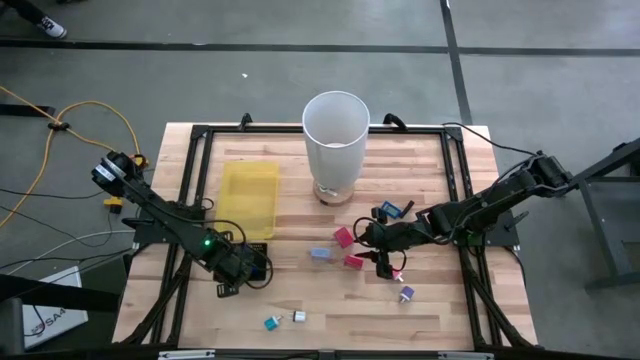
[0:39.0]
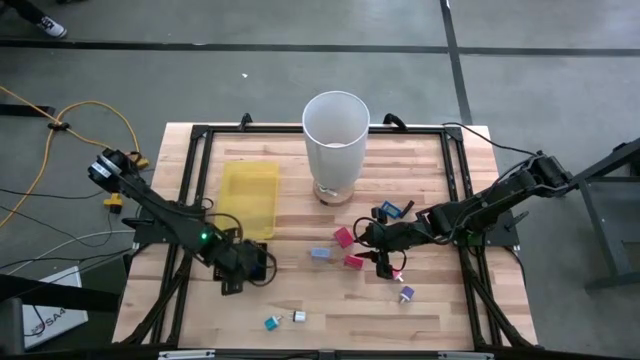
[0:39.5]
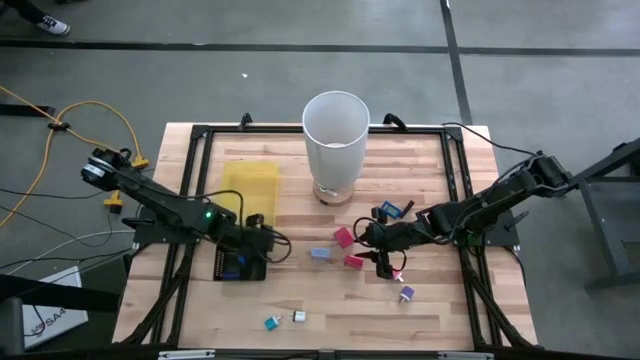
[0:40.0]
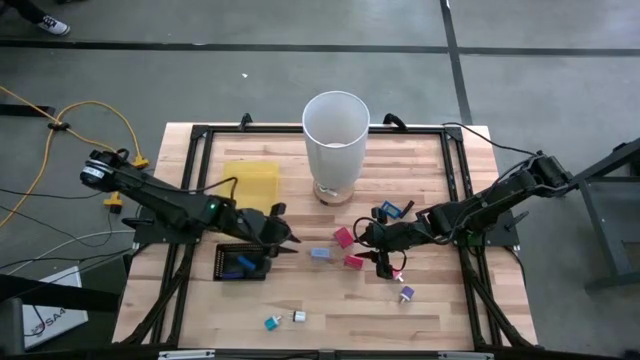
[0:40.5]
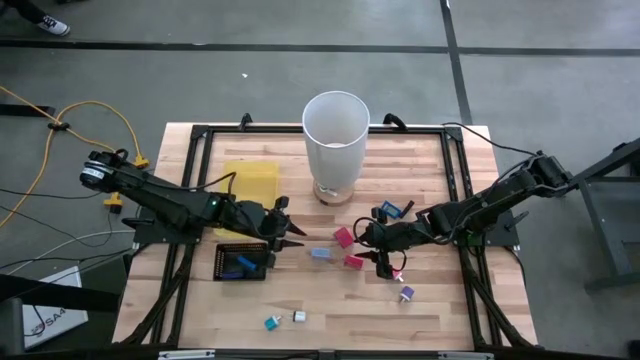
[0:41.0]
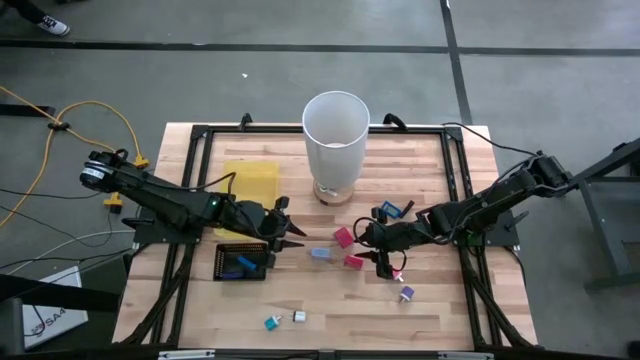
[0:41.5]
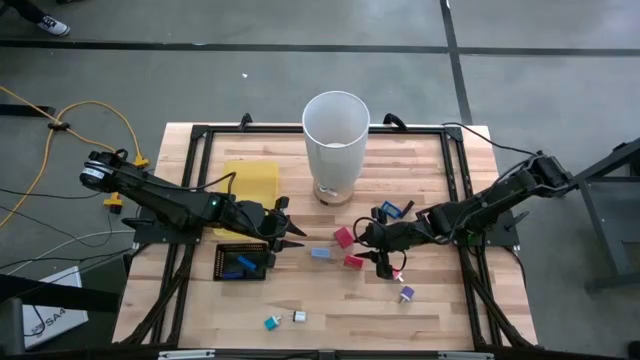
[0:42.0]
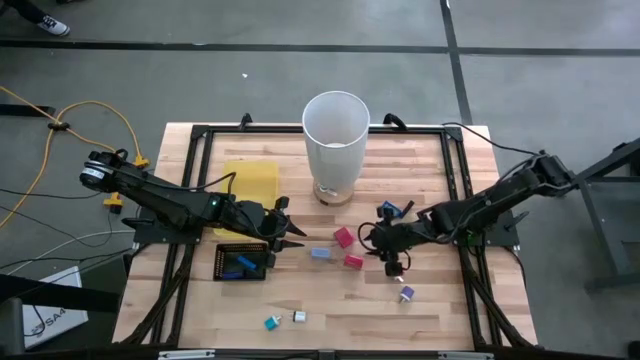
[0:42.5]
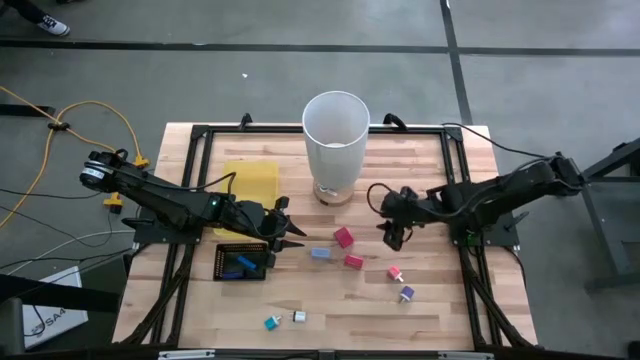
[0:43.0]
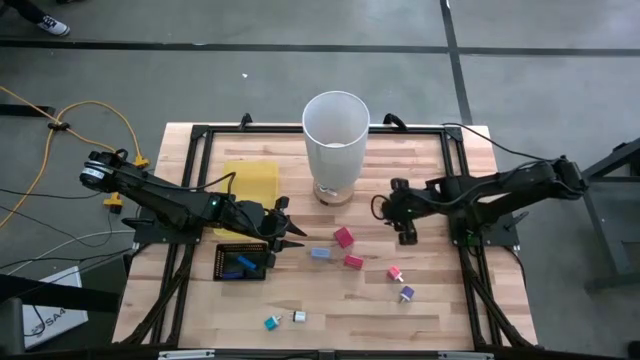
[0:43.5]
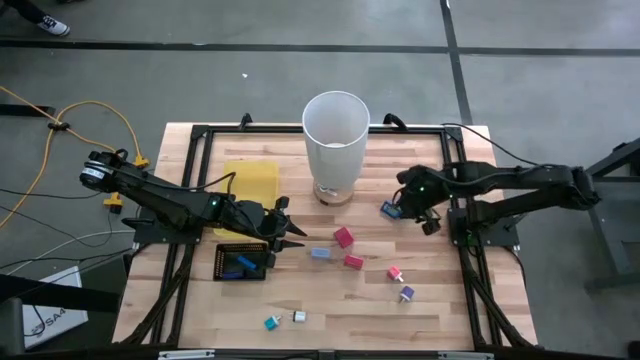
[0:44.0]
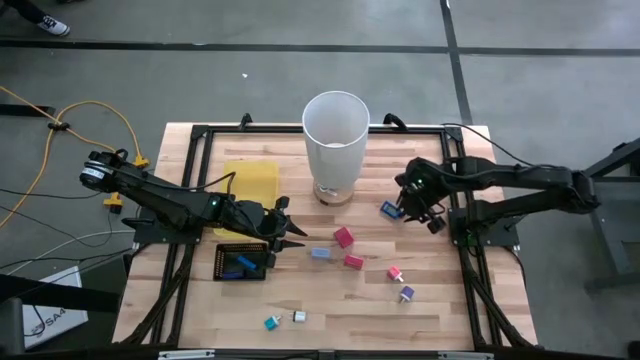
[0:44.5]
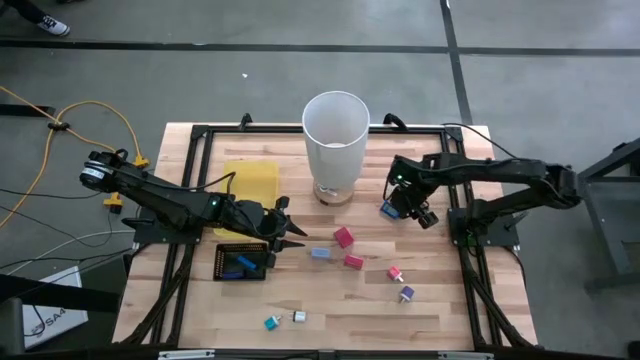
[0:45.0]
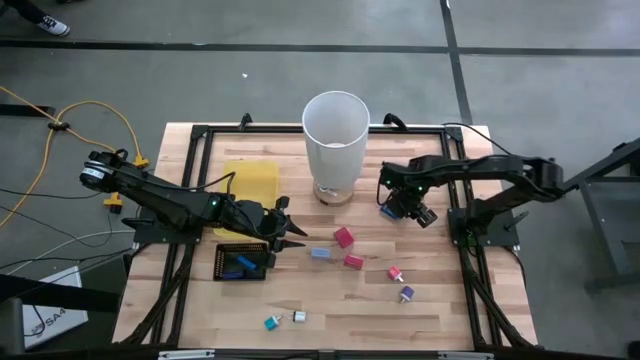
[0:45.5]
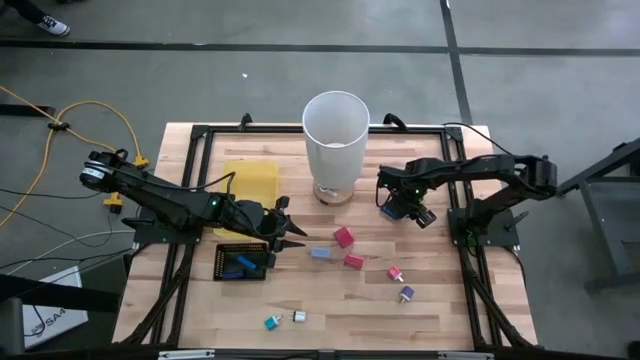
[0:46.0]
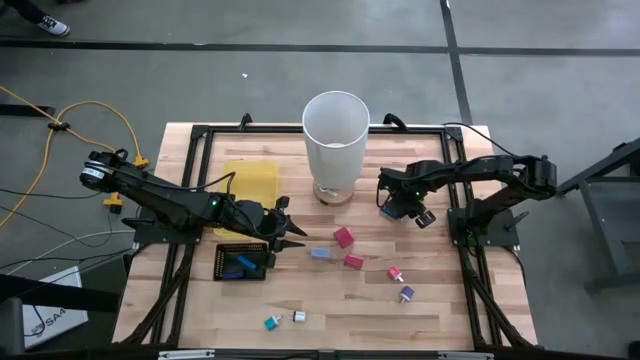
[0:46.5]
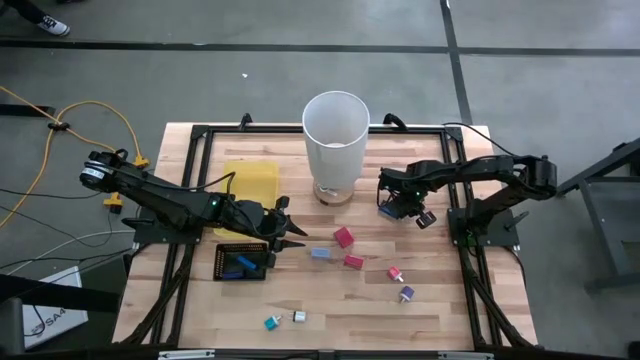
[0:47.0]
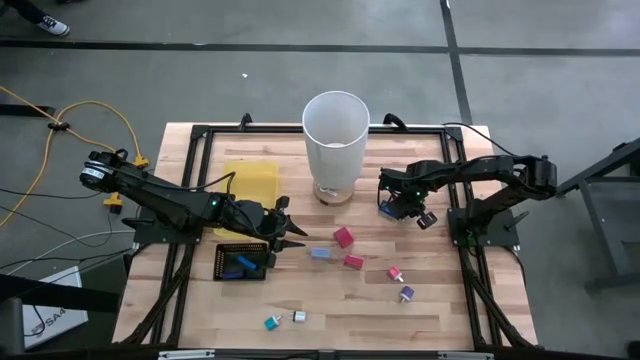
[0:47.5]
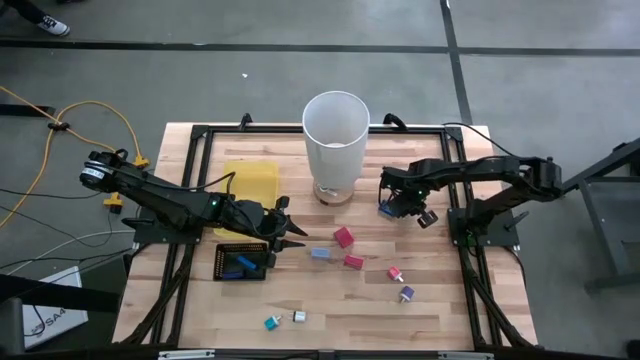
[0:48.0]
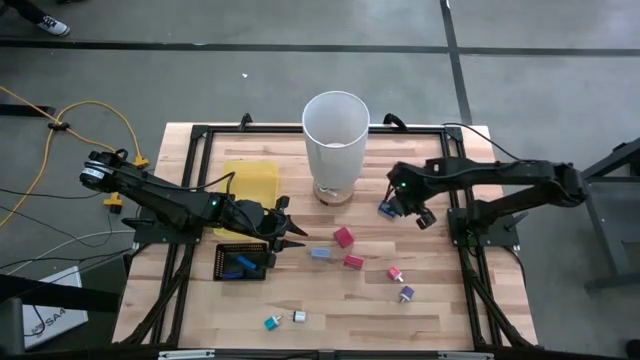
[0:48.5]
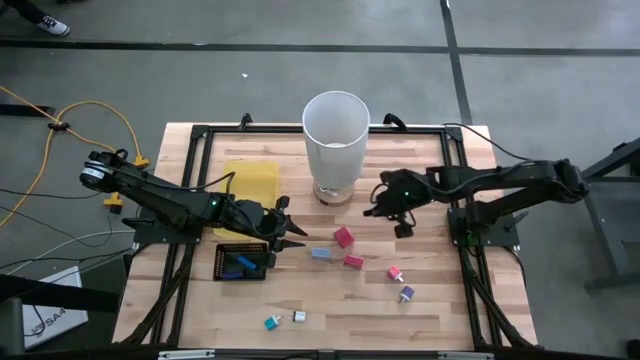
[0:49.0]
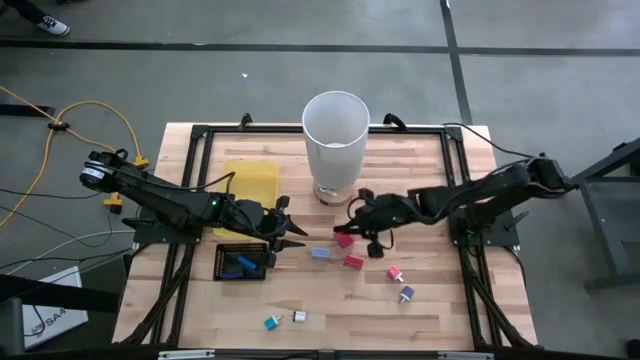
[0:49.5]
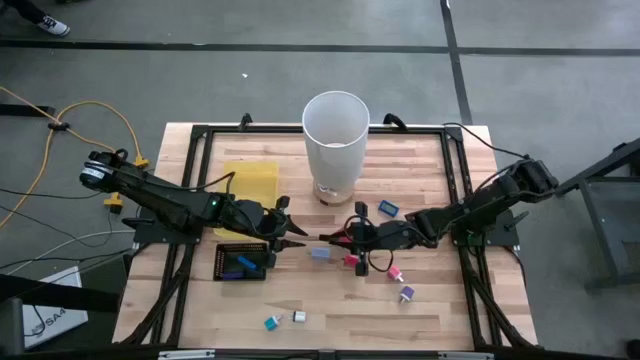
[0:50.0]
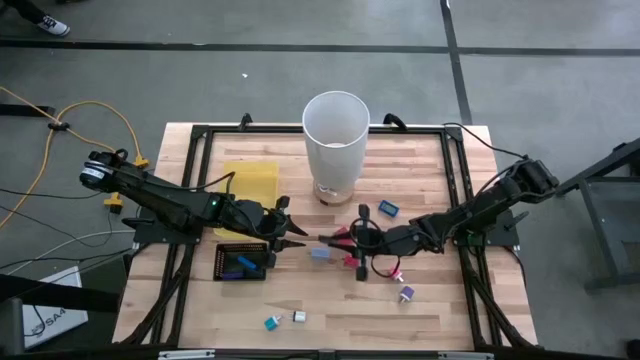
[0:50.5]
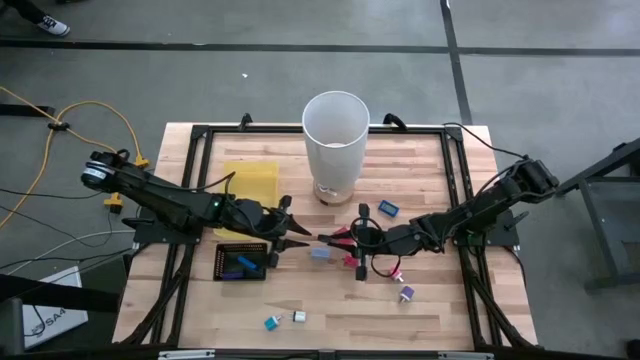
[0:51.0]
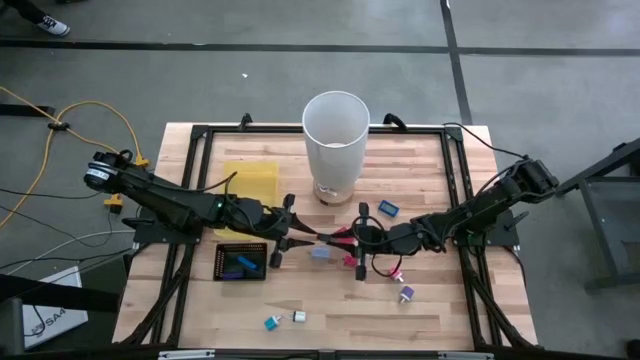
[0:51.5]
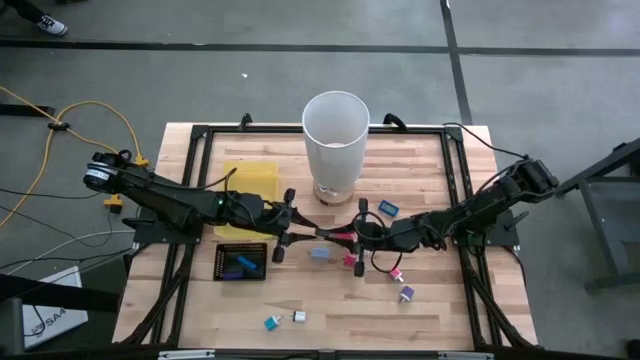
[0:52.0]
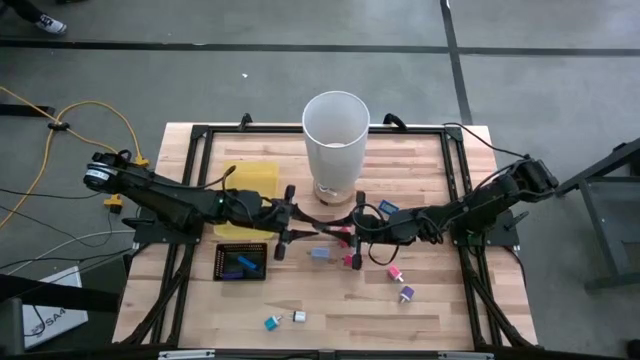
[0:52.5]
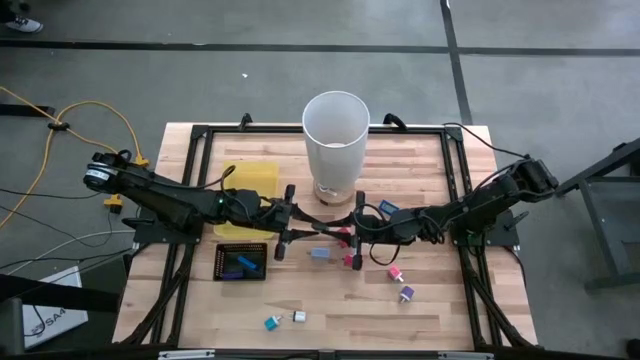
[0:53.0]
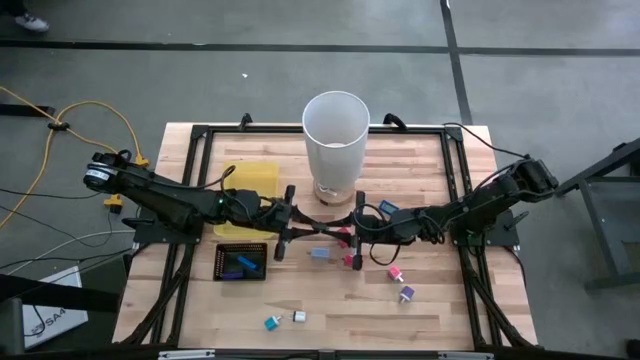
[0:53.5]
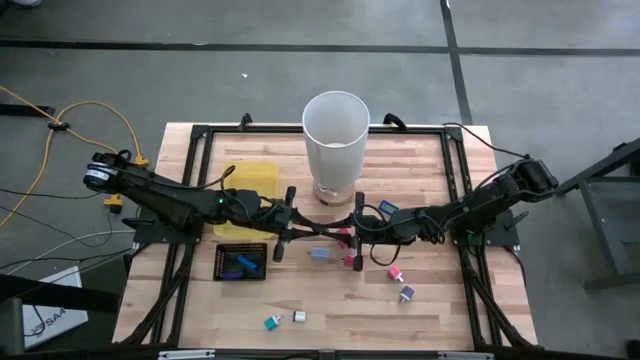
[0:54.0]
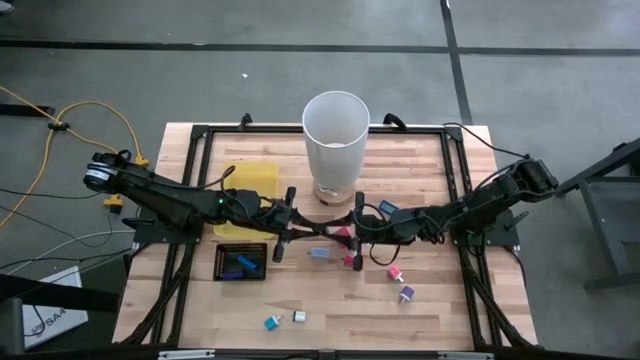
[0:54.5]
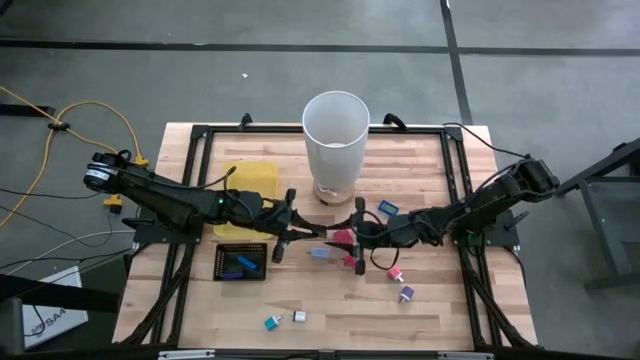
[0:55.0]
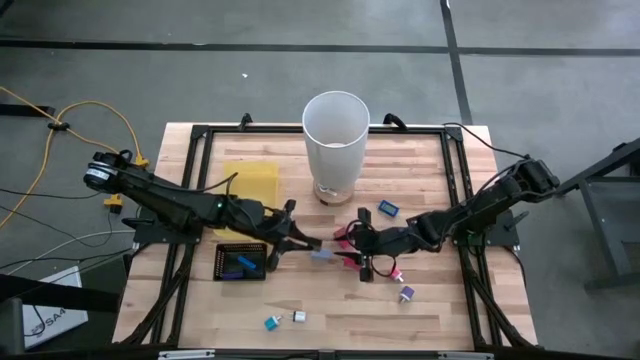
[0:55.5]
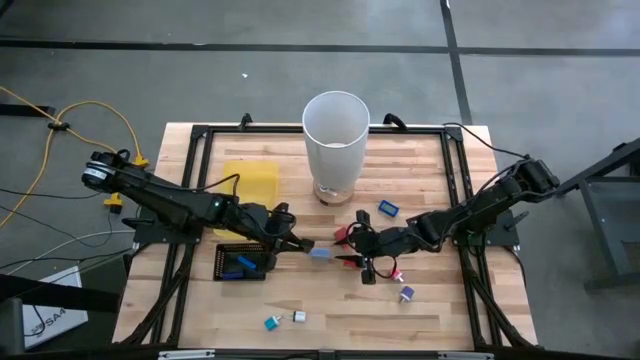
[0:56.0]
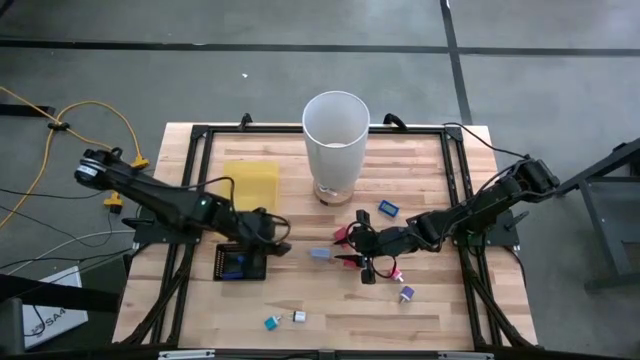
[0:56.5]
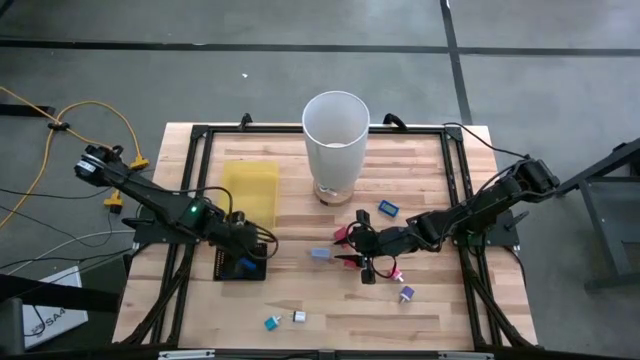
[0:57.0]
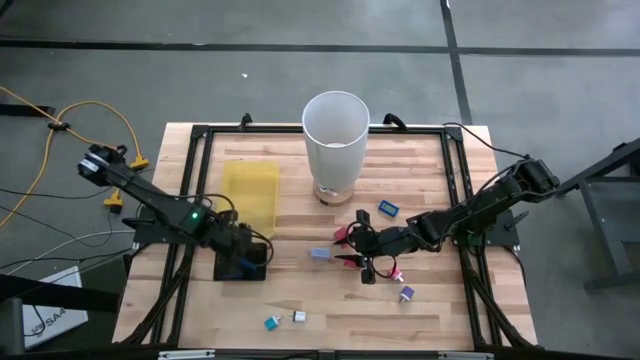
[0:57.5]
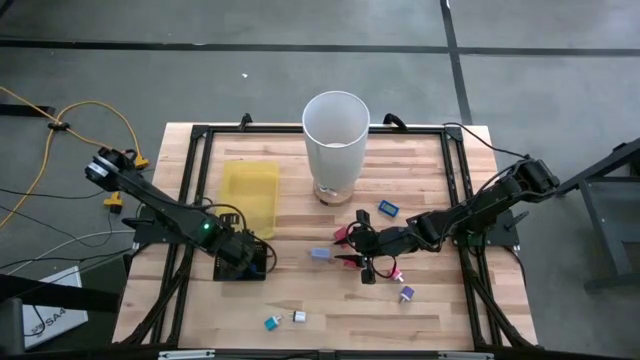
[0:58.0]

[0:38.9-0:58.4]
Task: Pick & Place Office items
Put the black digital clock into the black bin

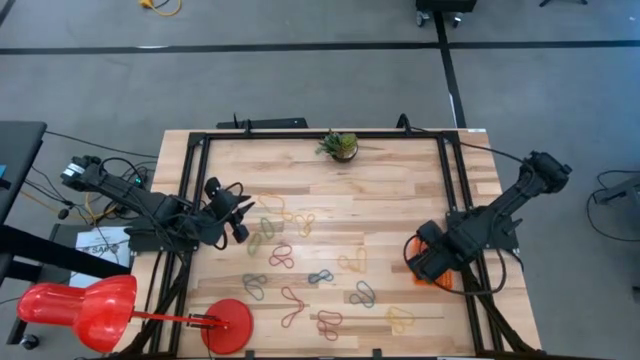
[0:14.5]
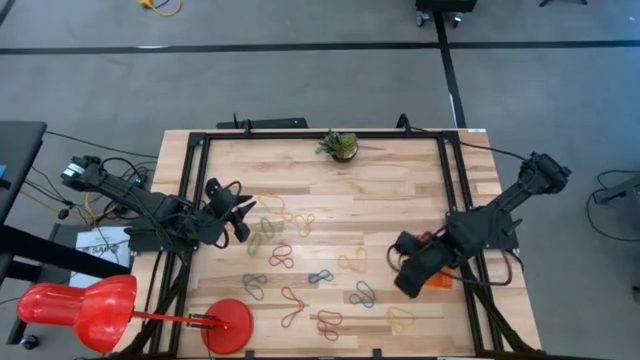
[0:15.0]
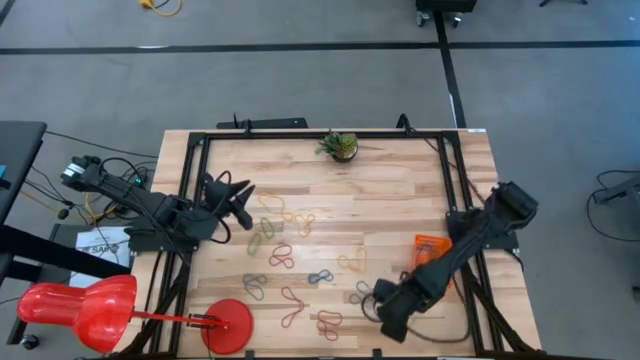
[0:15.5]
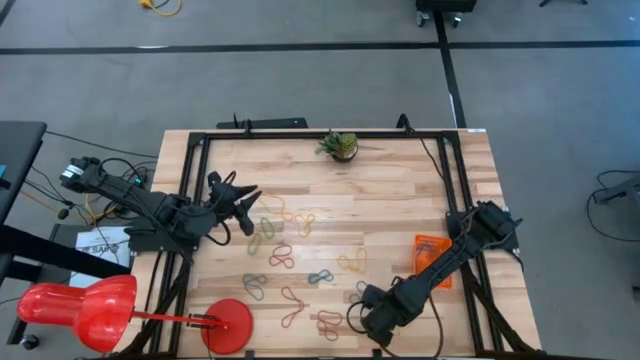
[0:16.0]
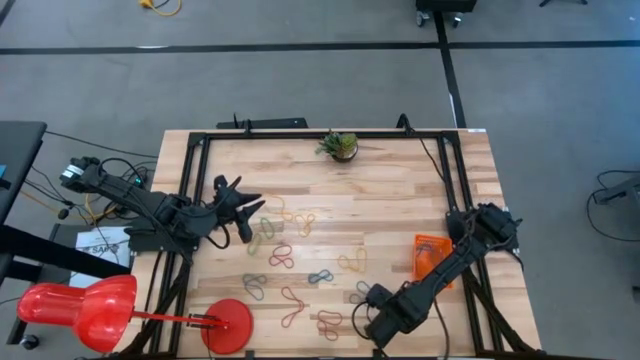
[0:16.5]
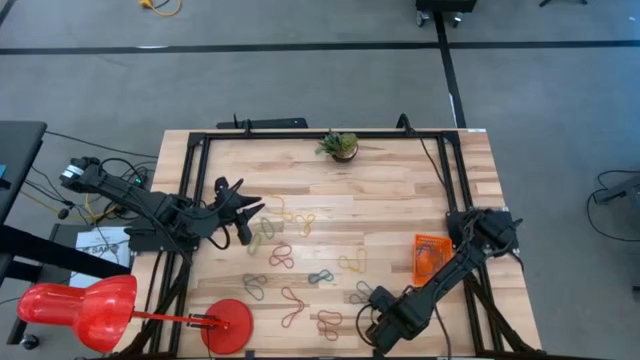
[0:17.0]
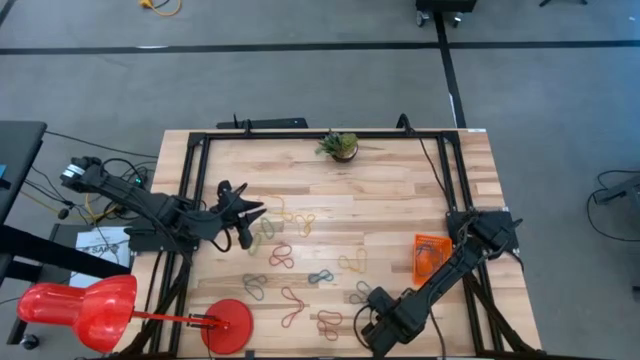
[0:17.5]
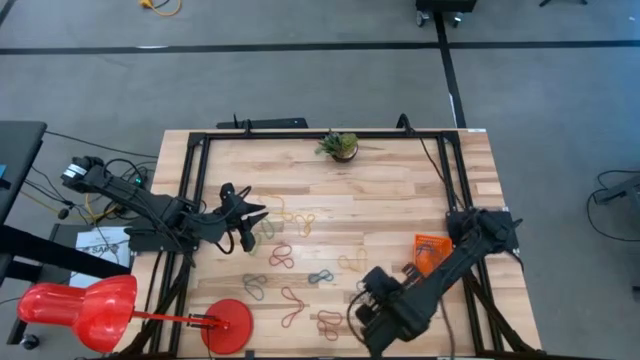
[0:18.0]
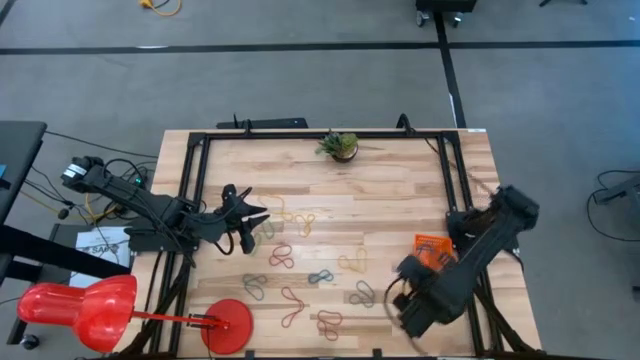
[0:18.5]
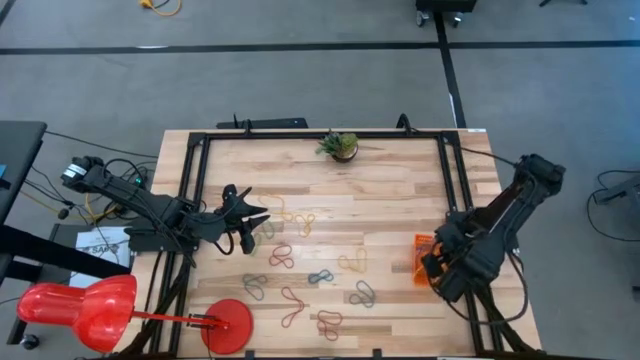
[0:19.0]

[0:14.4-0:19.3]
Task: Pick and place rubber bands into bin
Put the yellow rubber band into the orange basket
